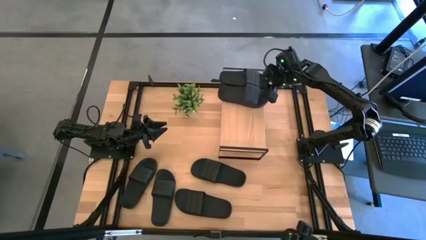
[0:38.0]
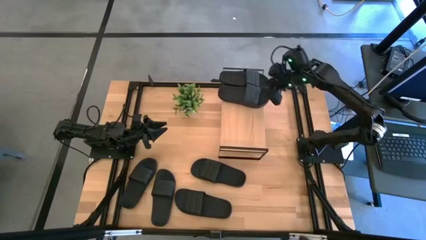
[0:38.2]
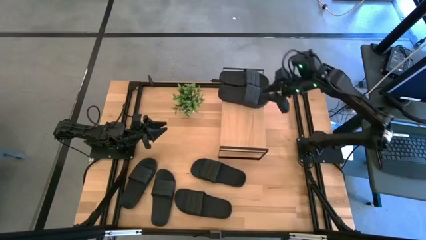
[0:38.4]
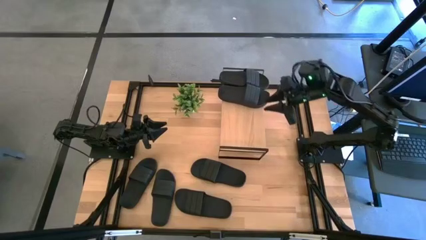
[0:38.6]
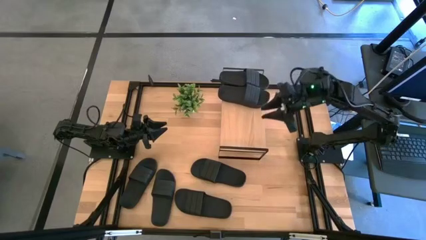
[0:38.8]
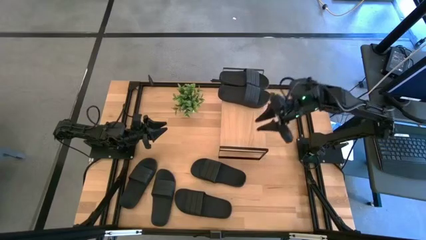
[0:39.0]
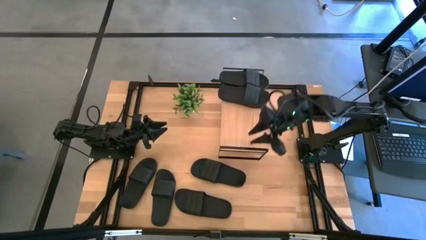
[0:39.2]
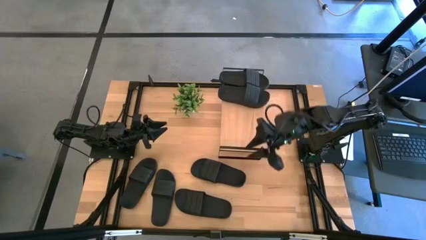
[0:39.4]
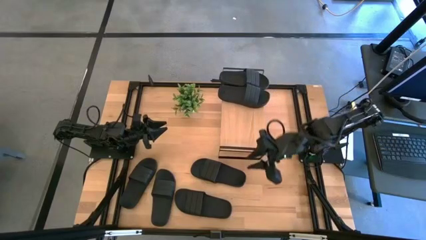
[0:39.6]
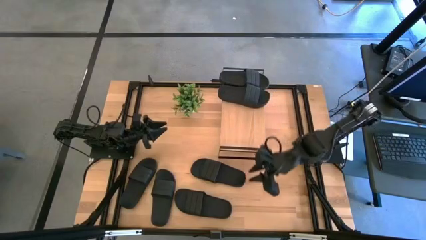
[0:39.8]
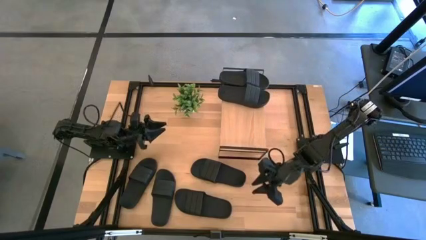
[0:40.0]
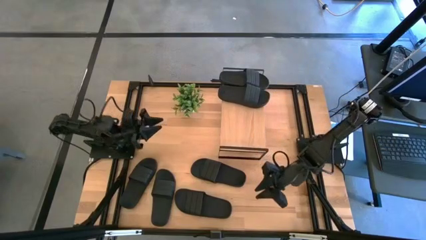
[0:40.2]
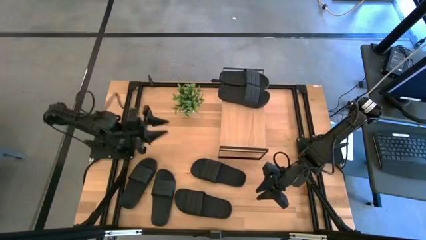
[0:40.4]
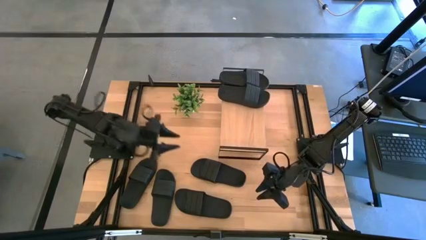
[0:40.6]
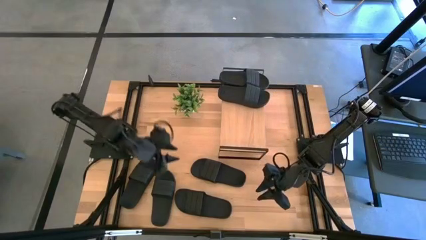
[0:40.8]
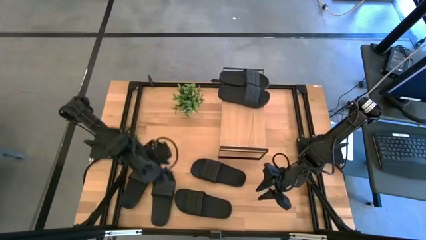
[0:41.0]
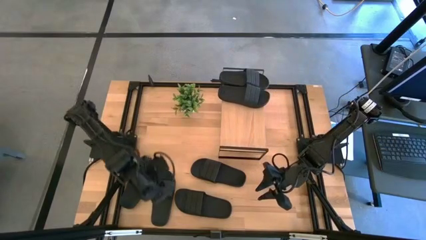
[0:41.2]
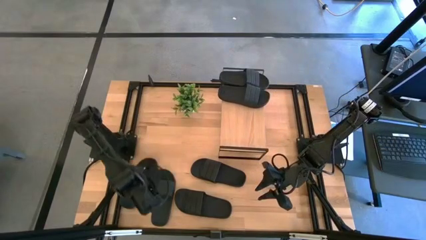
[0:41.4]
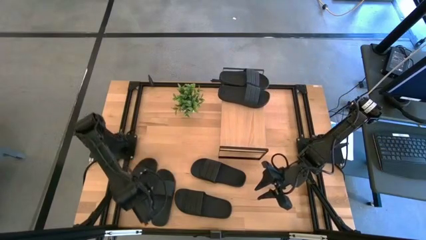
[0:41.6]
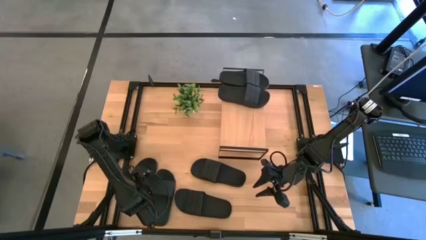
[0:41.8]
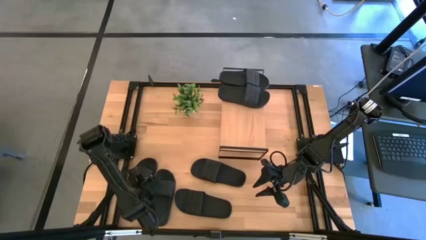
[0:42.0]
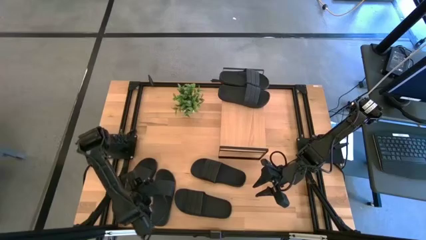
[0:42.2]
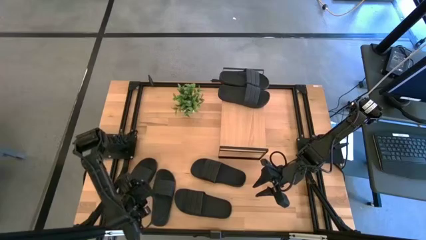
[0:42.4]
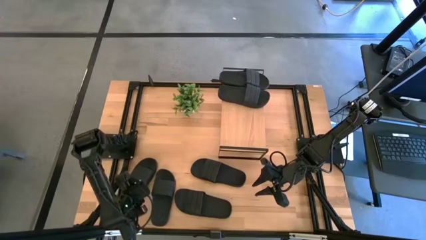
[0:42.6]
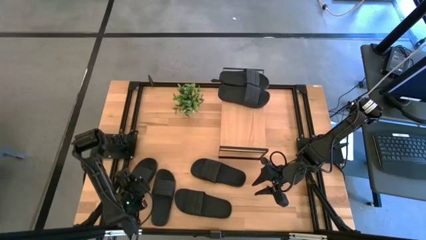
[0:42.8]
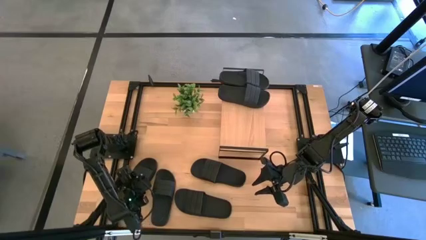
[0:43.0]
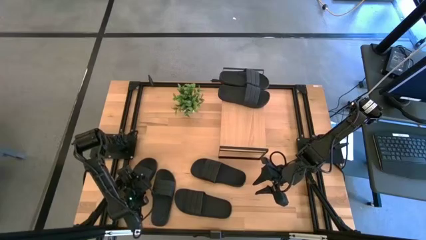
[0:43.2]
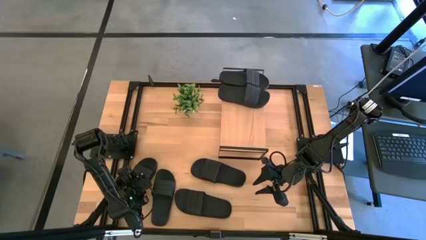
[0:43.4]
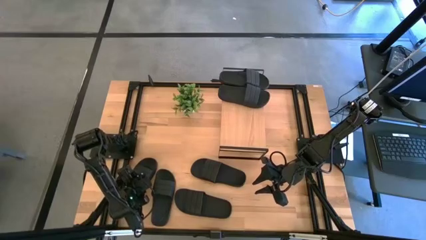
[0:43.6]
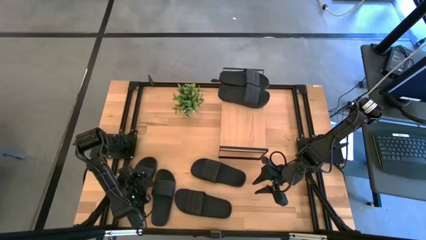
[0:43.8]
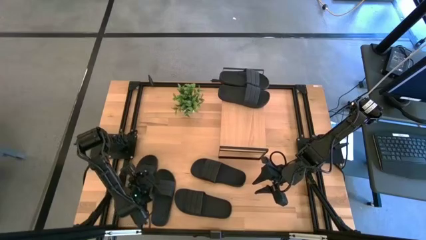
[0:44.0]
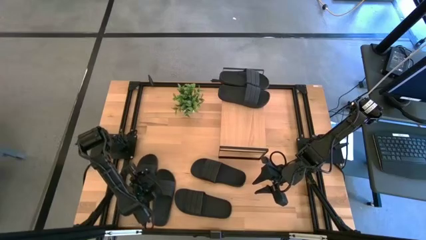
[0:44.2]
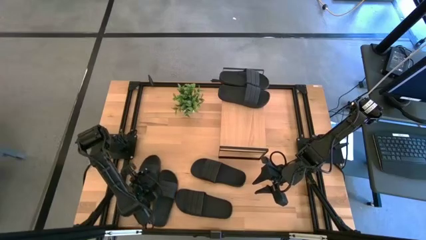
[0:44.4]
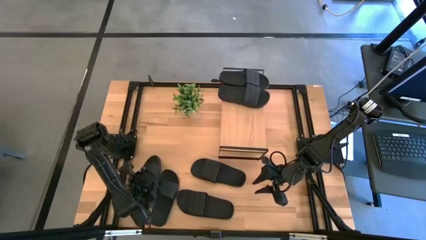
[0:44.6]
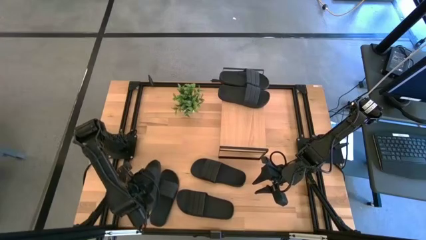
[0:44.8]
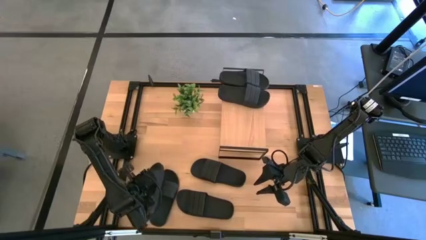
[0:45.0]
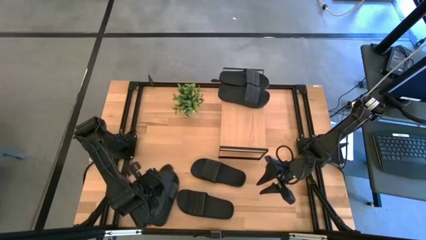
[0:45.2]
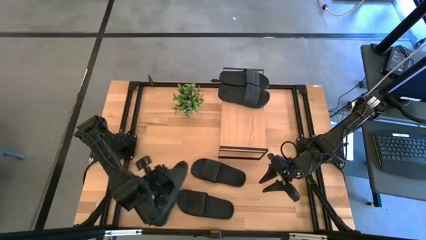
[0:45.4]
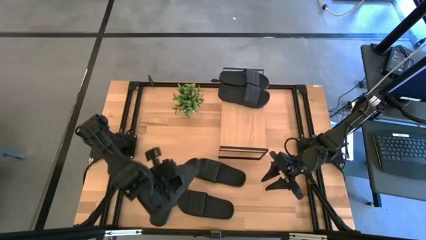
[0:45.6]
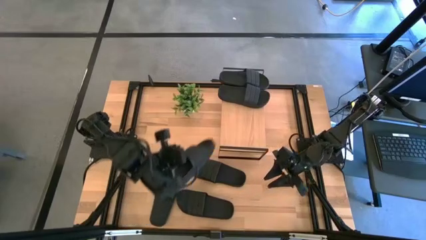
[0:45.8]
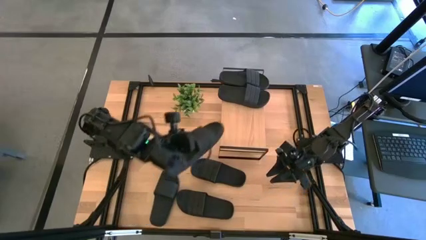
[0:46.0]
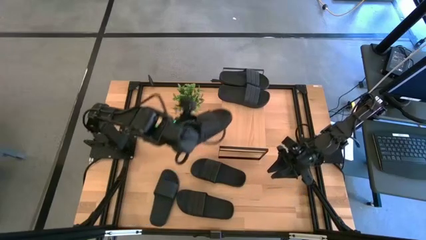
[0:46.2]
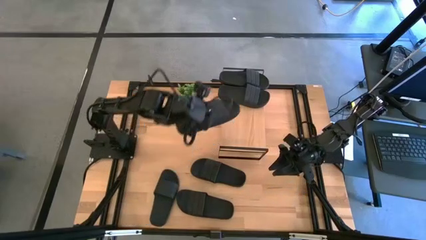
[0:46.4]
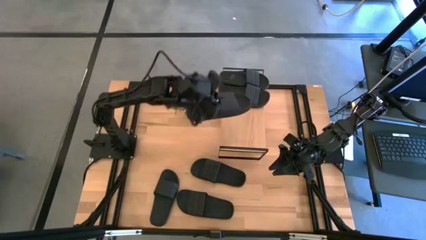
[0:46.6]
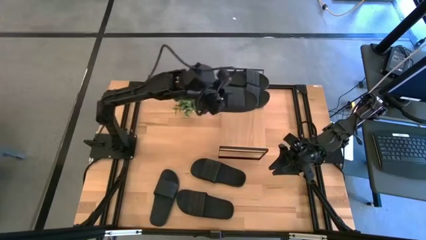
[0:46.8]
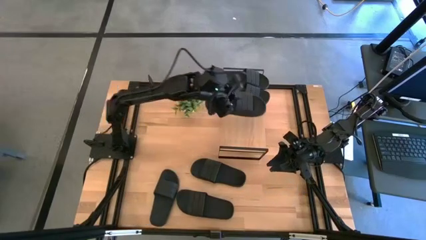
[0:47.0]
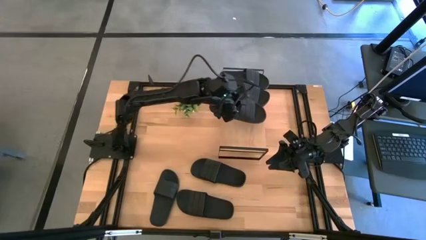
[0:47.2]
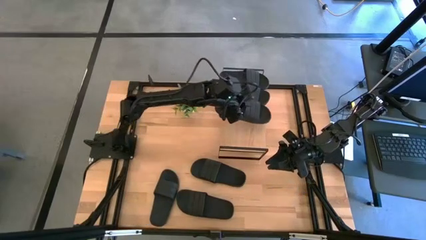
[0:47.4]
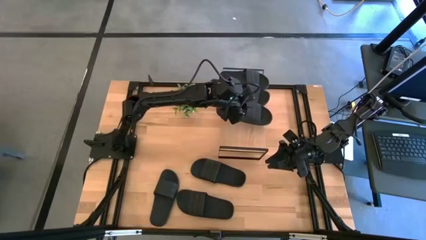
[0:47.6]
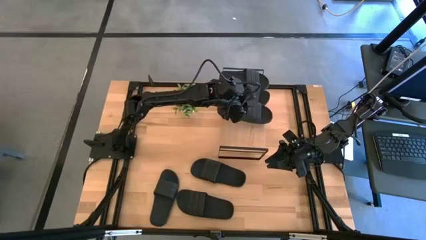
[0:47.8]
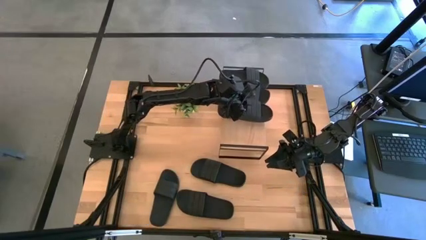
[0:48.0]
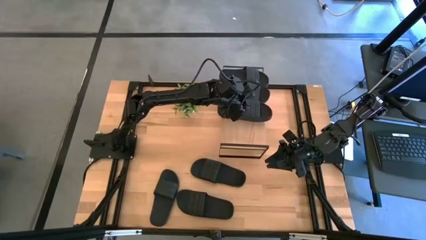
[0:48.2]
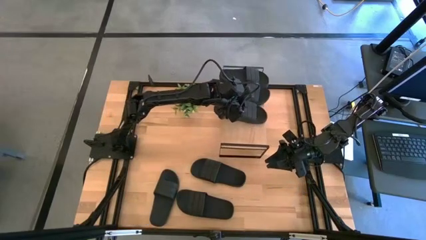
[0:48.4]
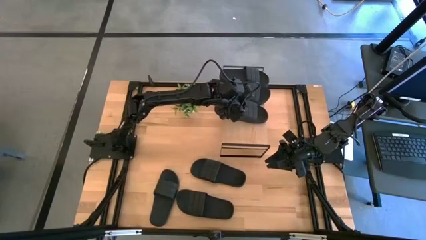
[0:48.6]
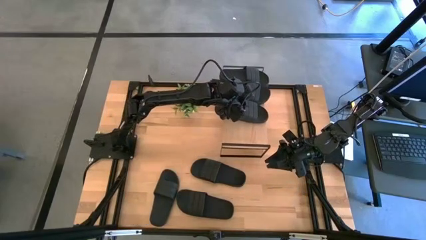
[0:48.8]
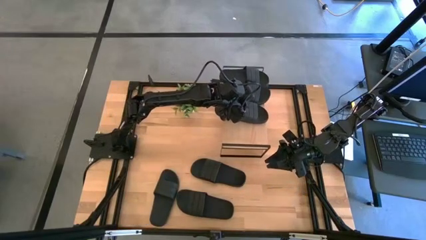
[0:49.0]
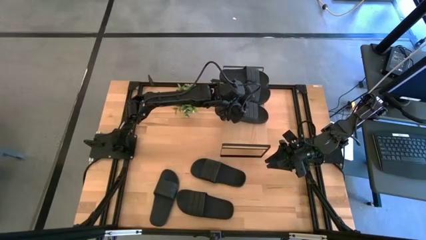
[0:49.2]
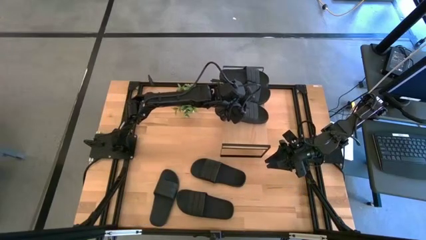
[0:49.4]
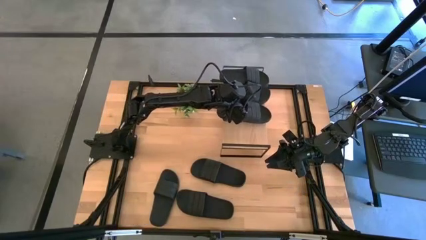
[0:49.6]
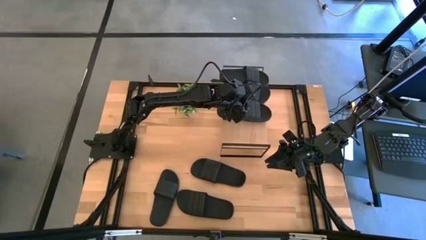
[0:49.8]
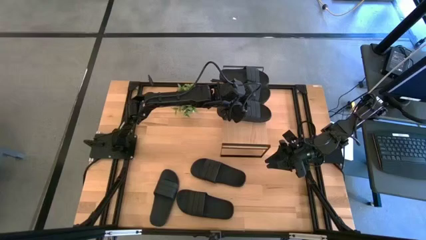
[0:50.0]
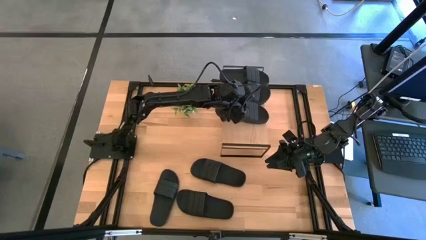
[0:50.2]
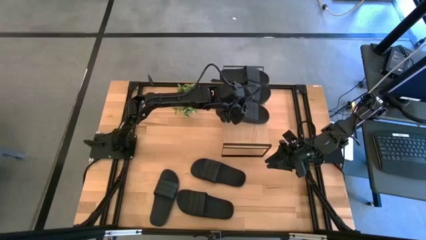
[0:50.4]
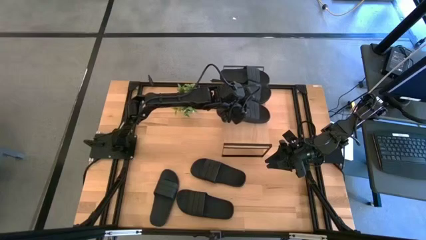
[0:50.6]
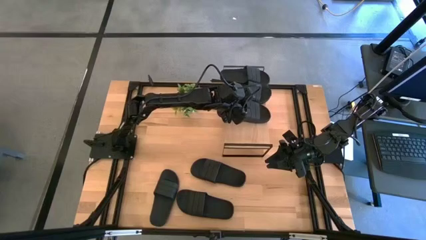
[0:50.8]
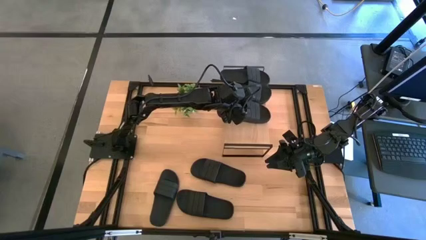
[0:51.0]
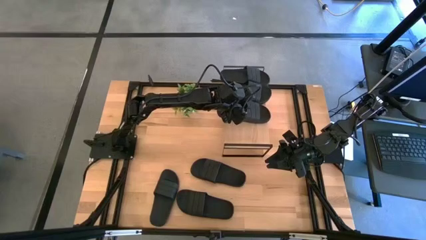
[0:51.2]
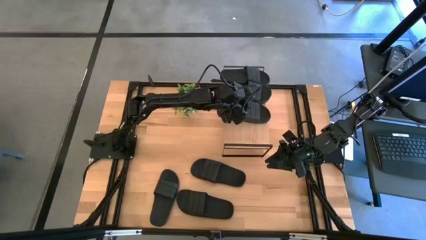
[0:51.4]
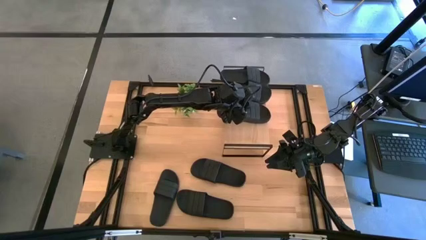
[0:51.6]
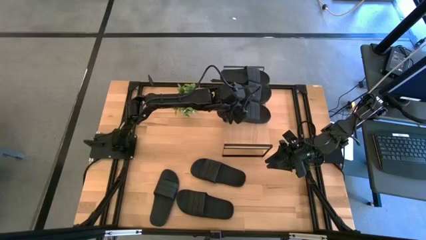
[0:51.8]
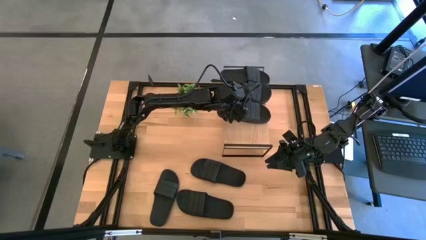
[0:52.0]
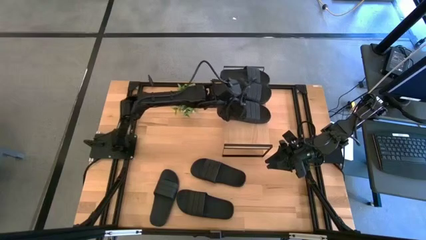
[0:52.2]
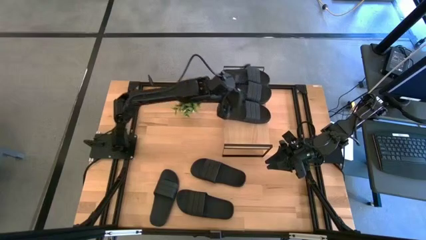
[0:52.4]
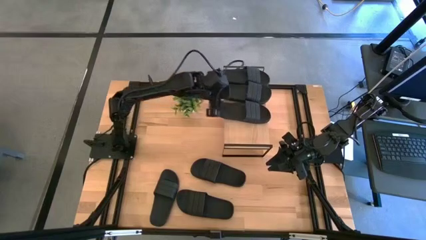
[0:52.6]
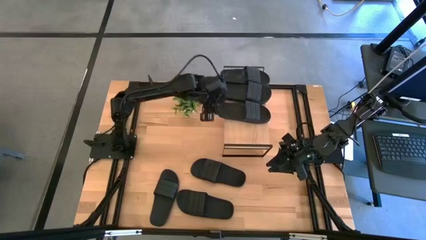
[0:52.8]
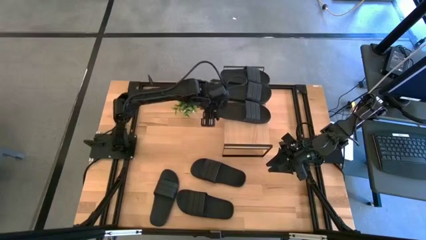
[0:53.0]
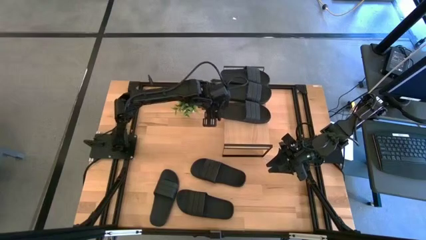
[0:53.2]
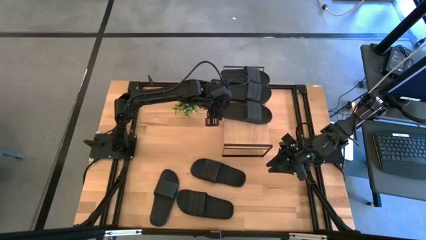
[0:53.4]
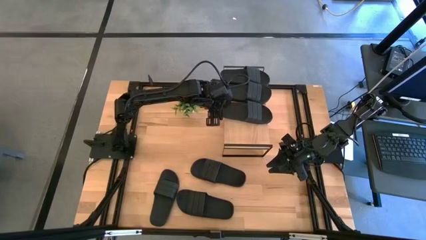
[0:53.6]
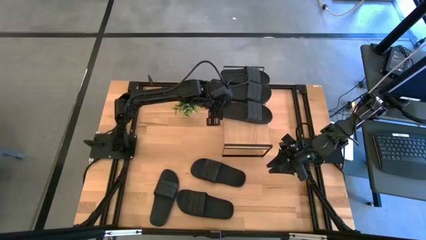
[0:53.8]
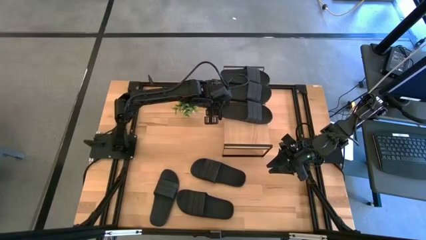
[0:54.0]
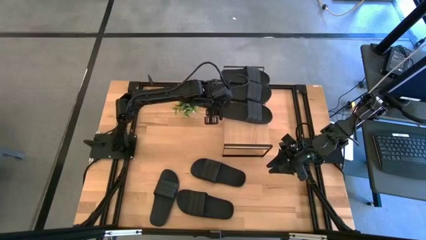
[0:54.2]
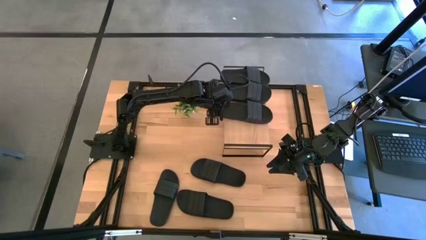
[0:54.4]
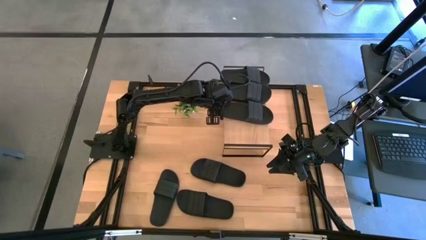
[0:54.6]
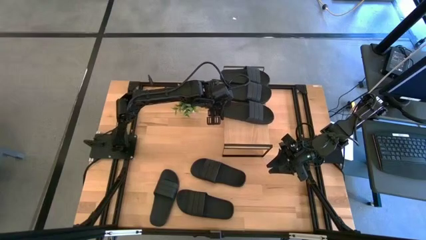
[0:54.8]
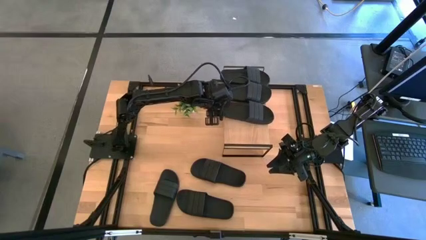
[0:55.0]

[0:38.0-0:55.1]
Task: Pick and place slides into the shelf
Put the black slide on the shelf
